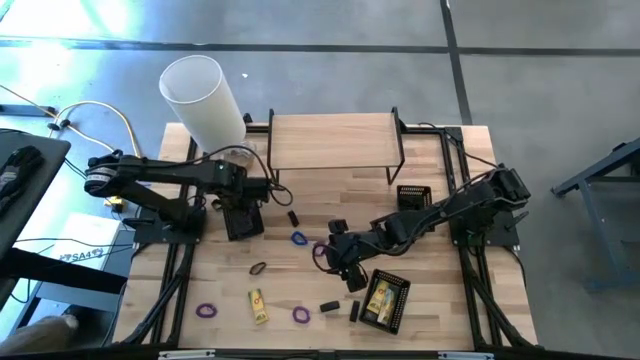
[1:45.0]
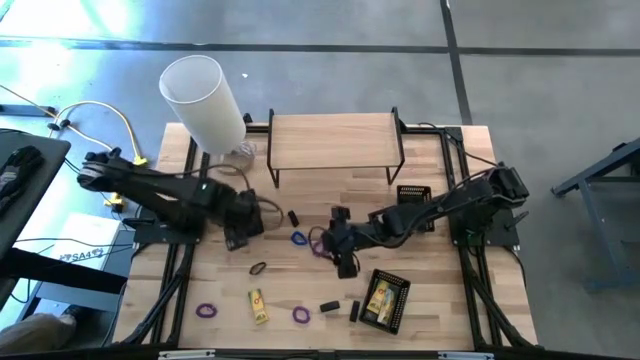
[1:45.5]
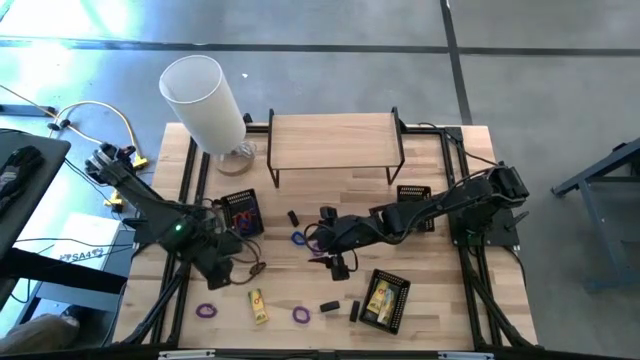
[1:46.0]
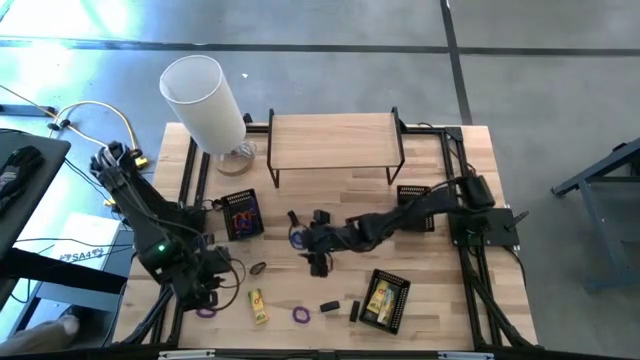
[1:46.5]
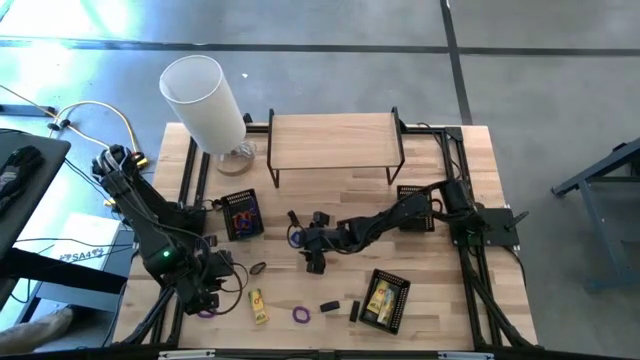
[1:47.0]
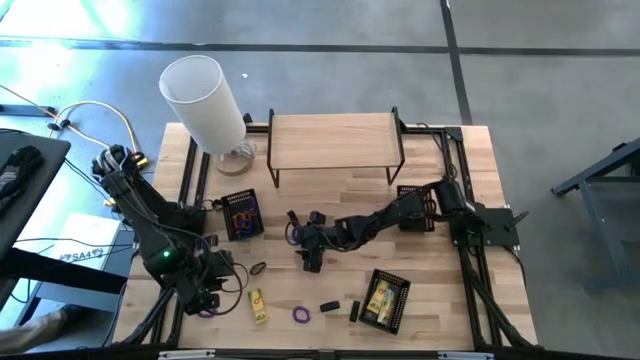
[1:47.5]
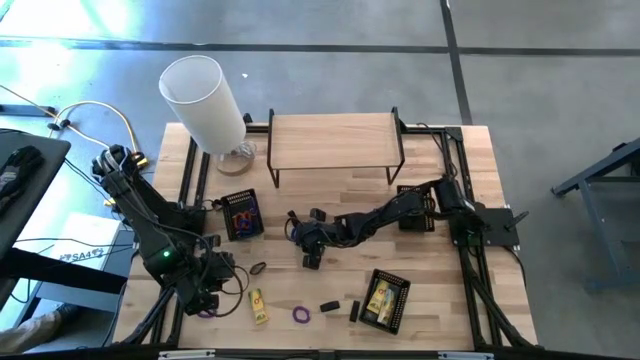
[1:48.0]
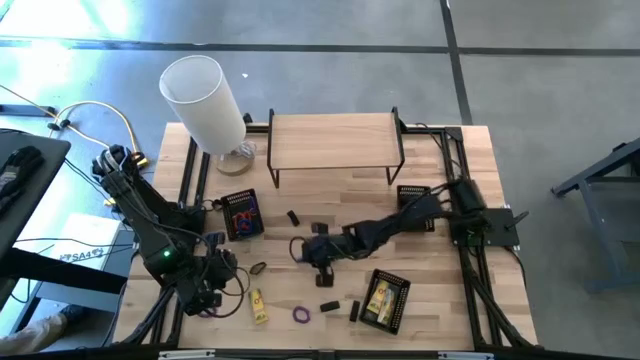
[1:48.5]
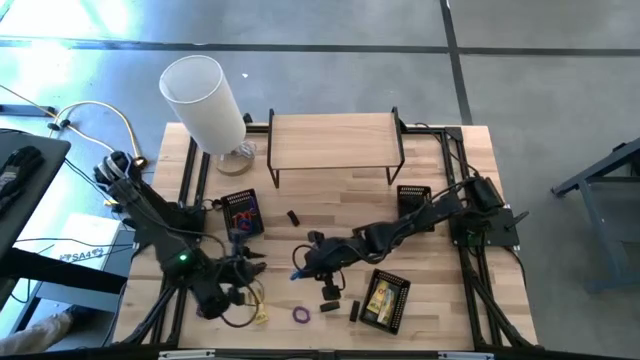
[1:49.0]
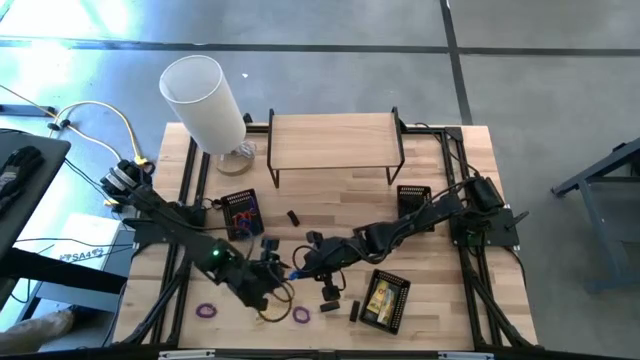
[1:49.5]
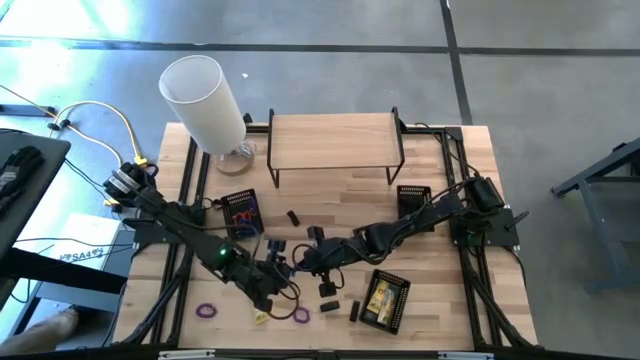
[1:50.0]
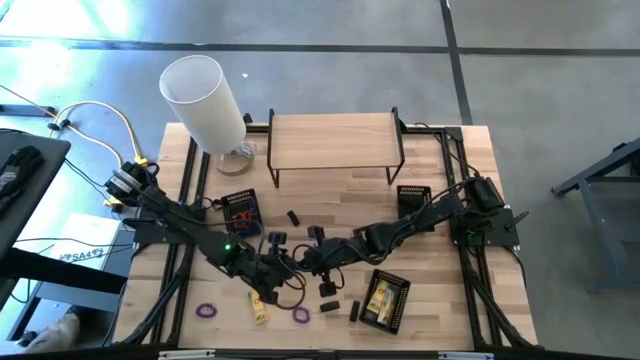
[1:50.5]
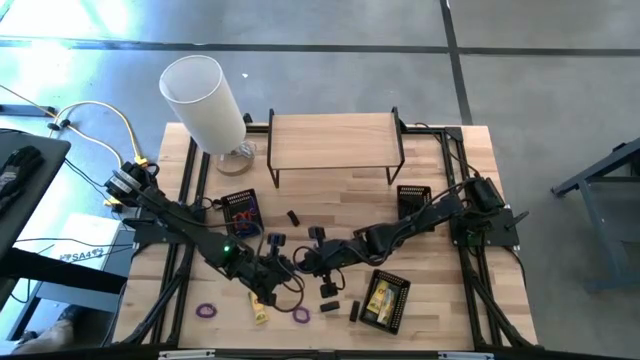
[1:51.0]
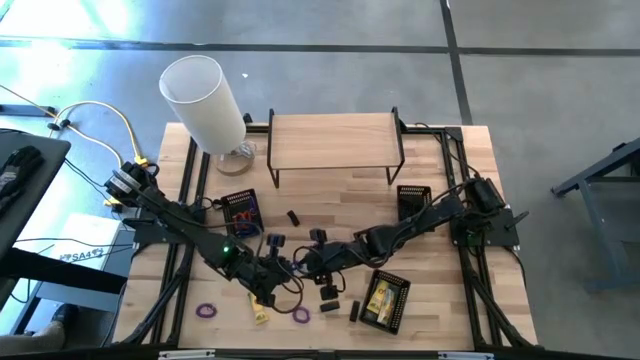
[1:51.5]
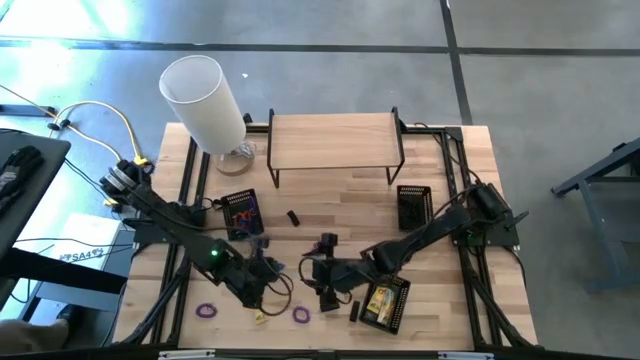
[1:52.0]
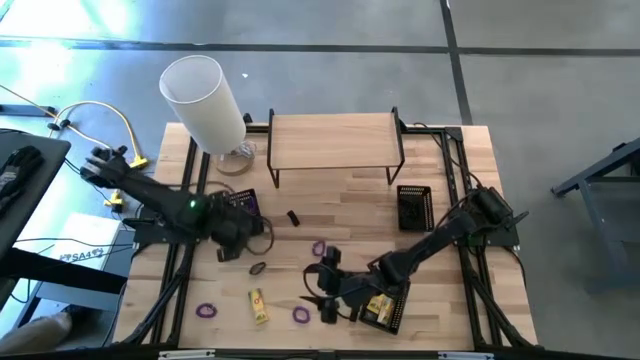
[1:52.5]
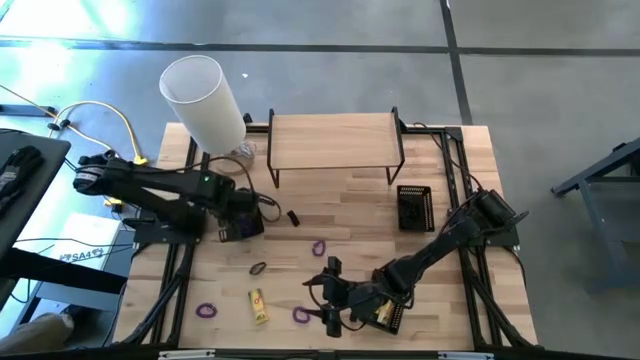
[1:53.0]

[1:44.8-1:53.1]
Task: Pick & Place Office Desk Supplies
Put the blue spiral keychain into the top left bin

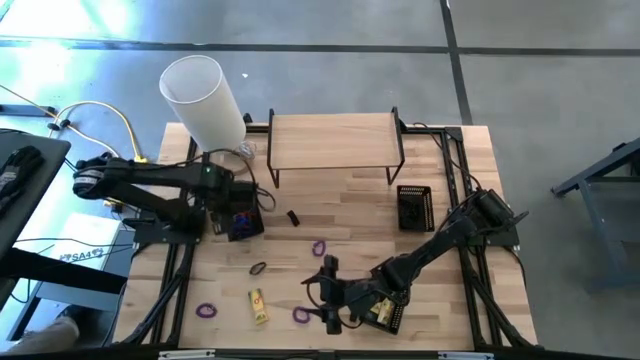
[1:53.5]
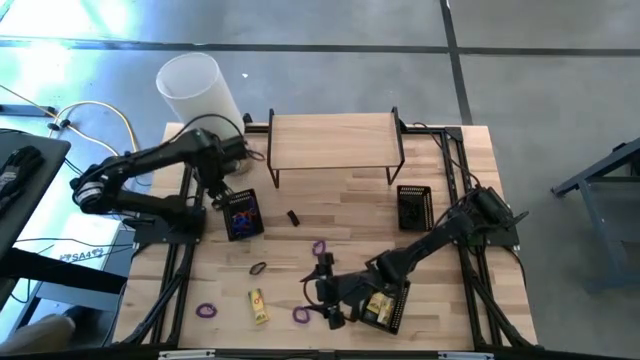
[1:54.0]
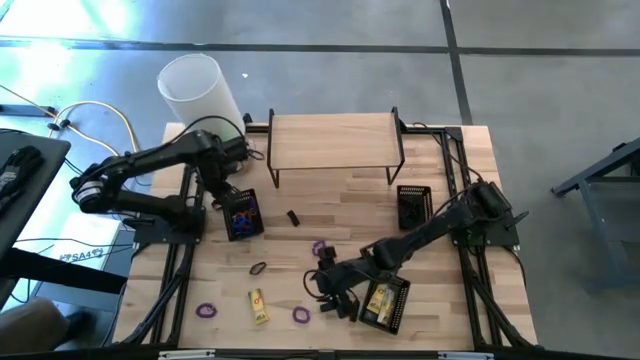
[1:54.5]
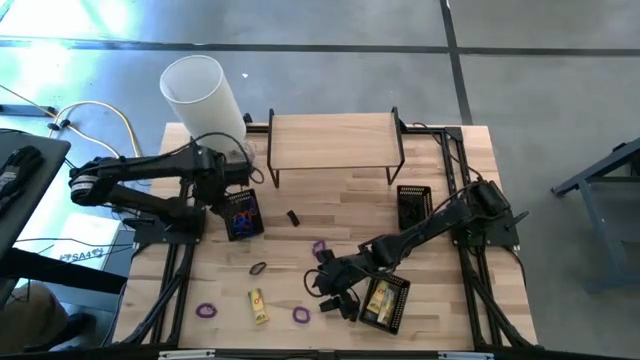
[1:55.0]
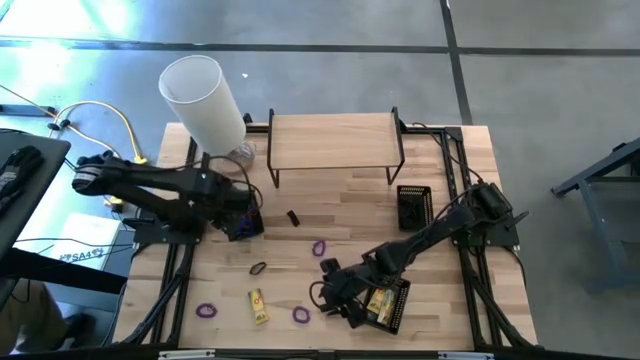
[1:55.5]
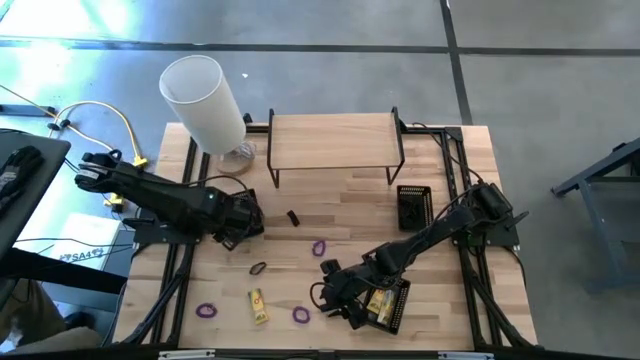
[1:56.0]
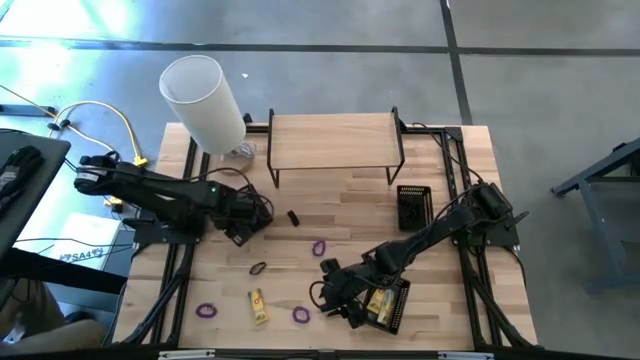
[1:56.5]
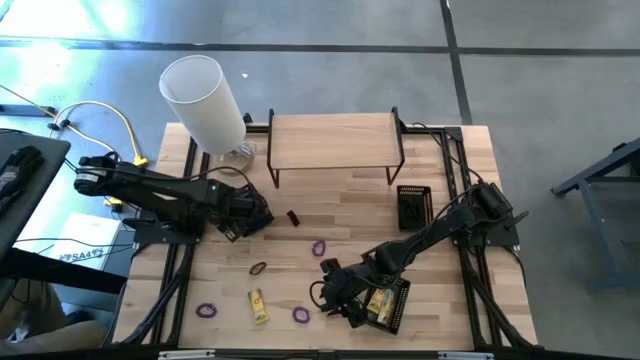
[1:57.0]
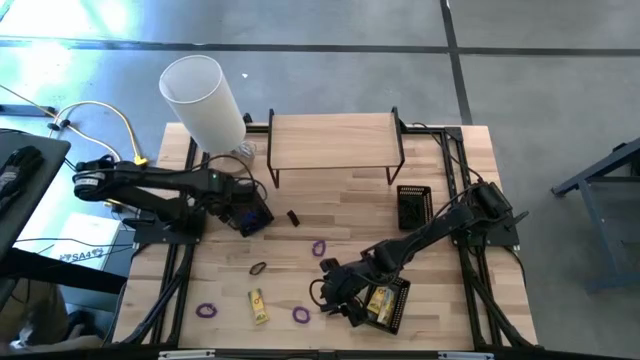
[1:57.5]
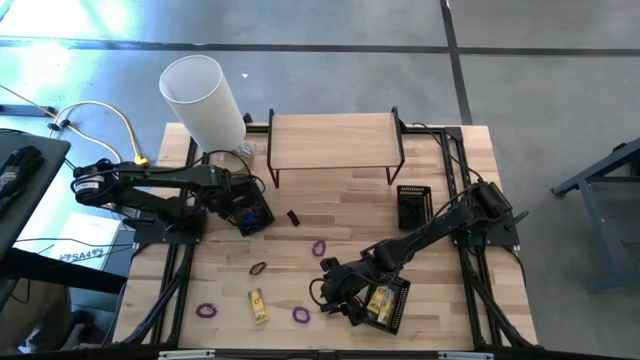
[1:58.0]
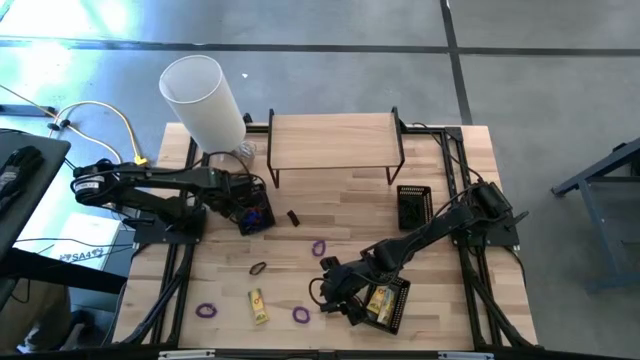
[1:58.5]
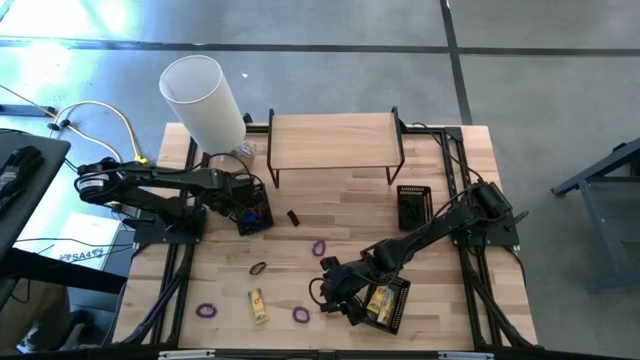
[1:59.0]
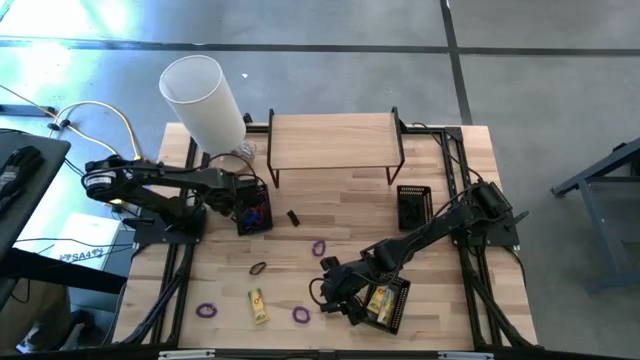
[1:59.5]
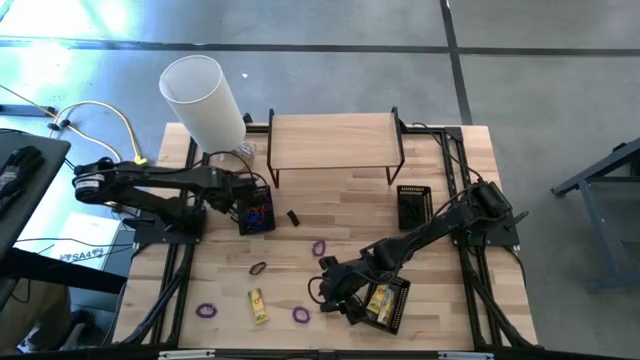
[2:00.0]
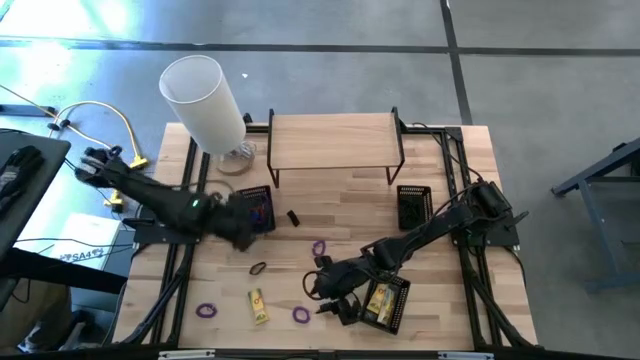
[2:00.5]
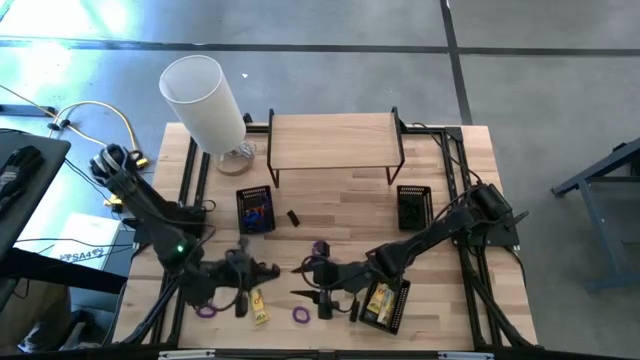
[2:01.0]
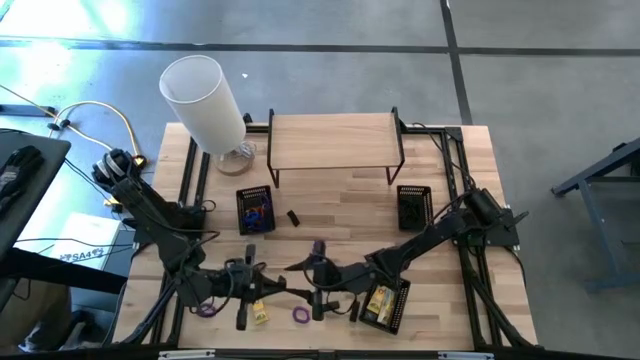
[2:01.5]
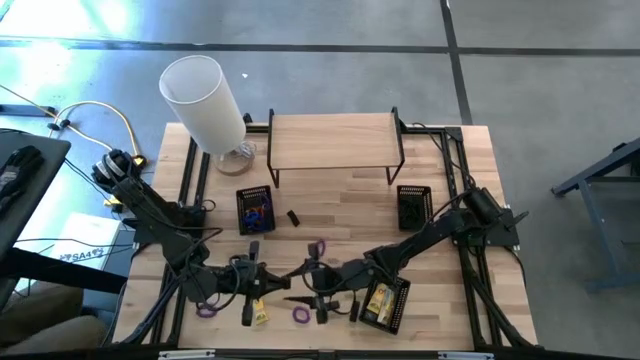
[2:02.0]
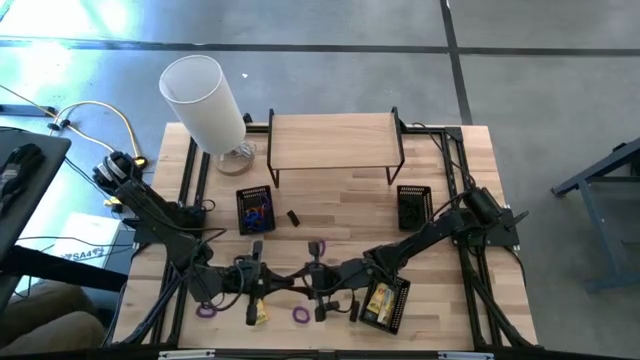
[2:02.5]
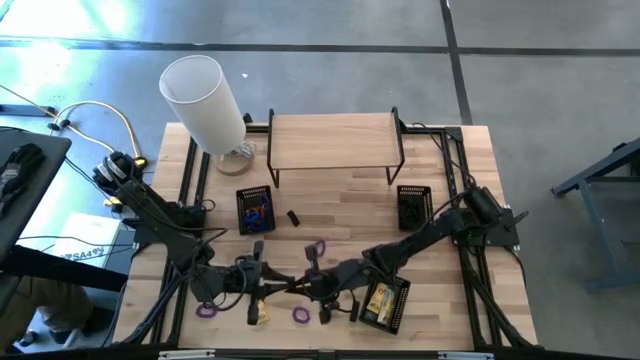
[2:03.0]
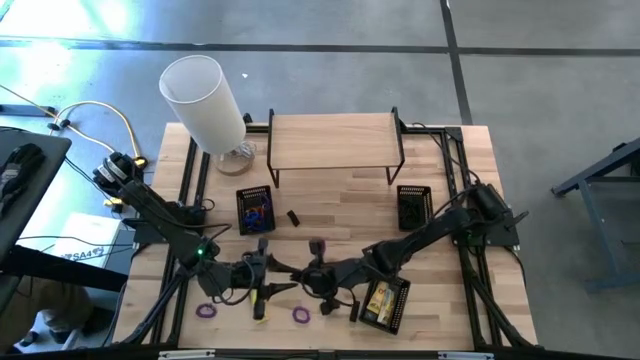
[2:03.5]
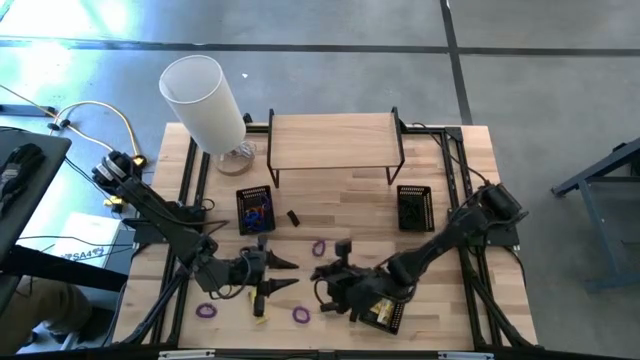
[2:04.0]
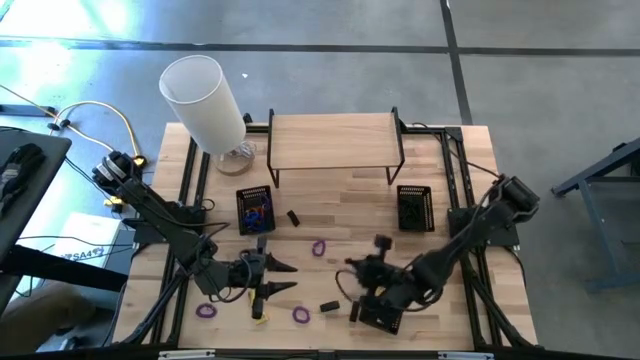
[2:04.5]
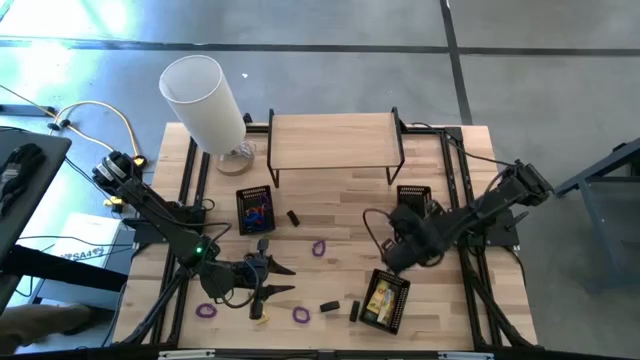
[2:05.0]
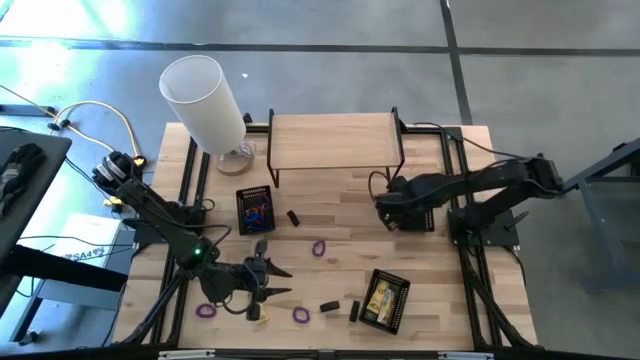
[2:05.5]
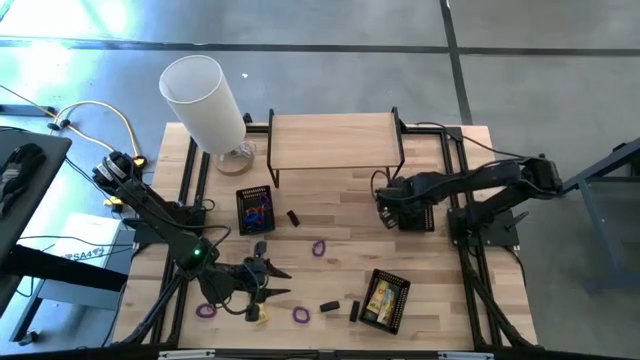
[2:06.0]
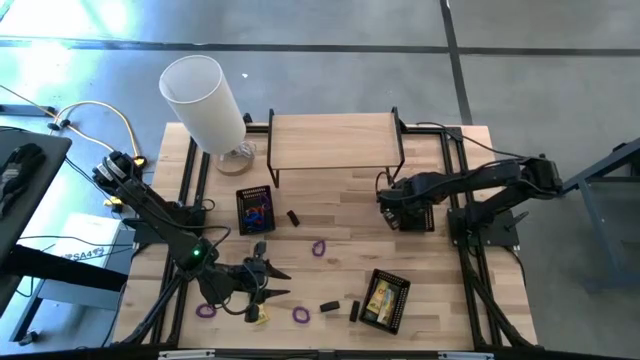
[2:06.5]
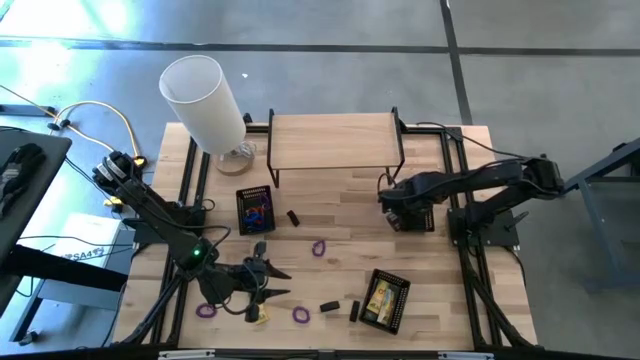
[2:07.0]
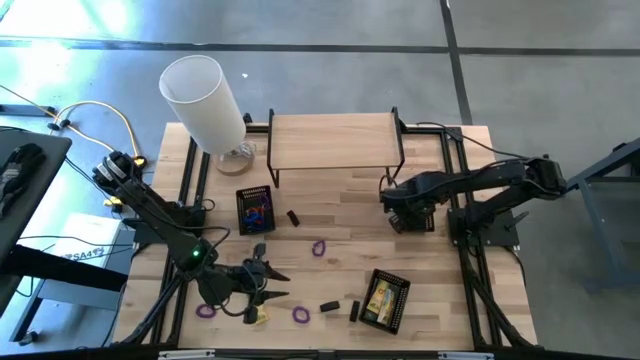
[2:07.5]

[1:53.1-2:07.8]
Put the rubber band into the top right bin
